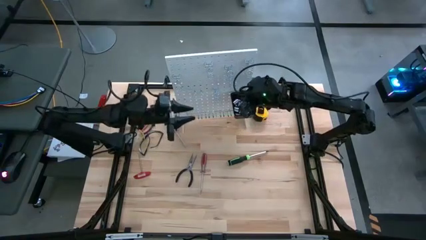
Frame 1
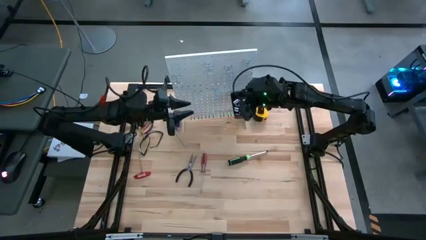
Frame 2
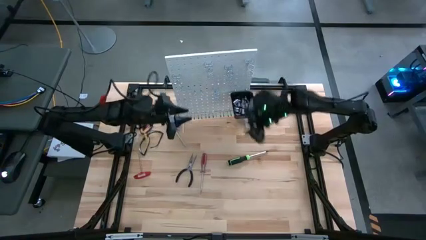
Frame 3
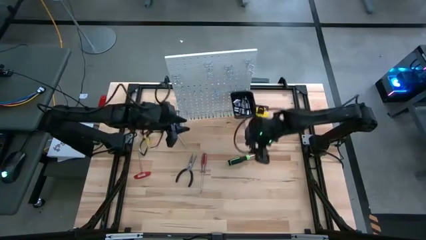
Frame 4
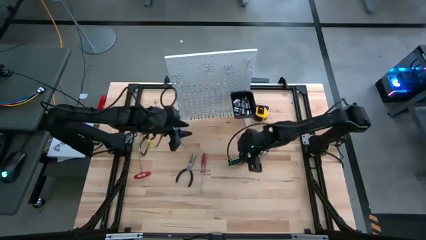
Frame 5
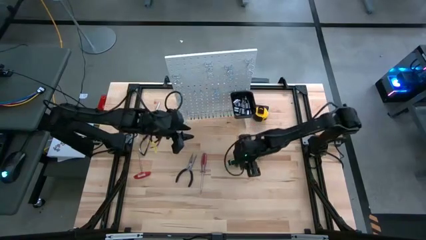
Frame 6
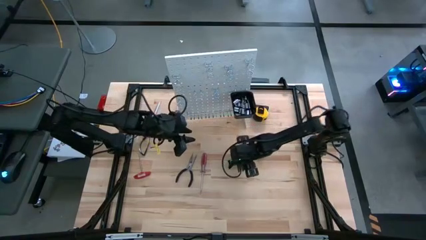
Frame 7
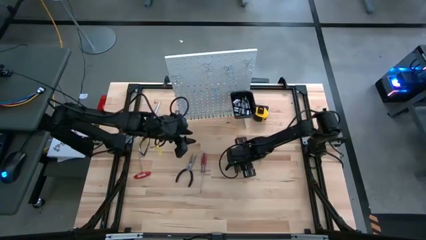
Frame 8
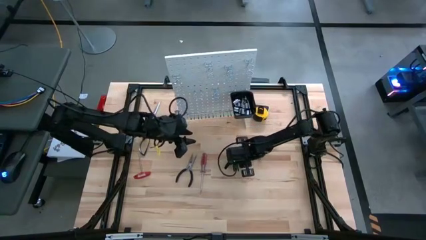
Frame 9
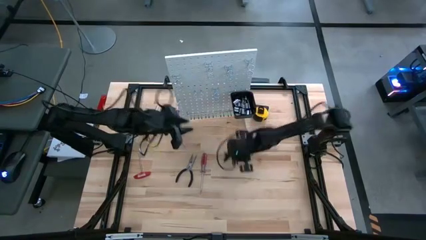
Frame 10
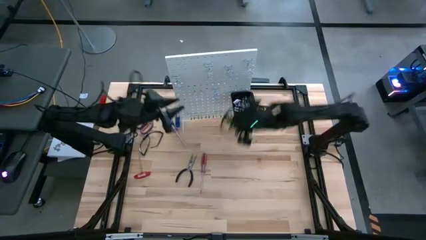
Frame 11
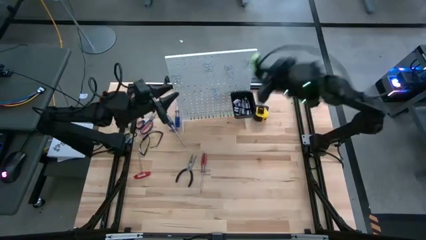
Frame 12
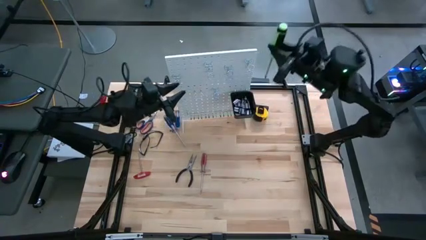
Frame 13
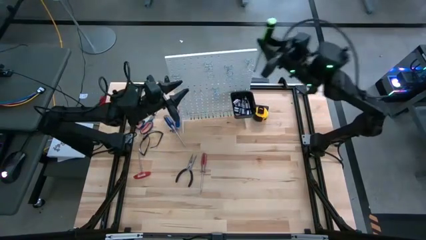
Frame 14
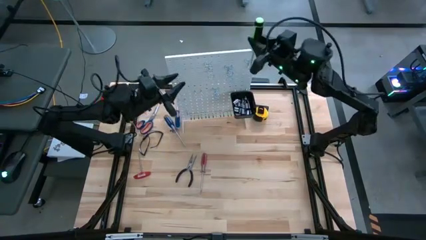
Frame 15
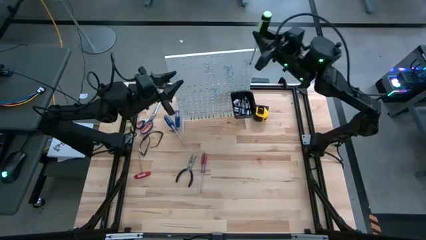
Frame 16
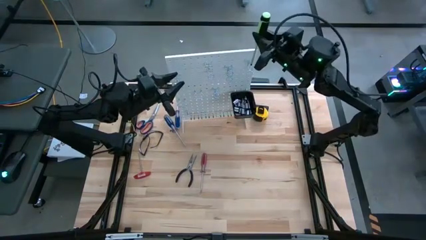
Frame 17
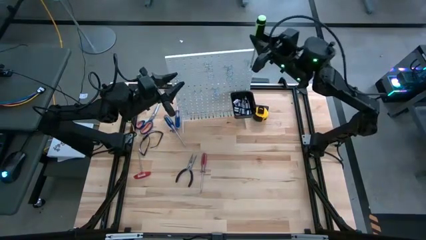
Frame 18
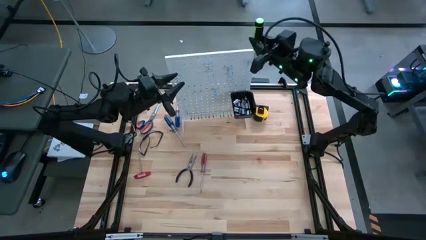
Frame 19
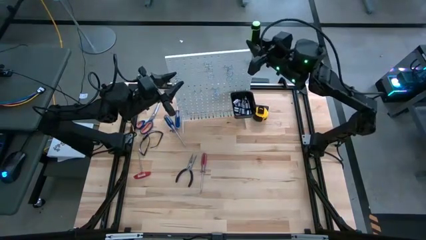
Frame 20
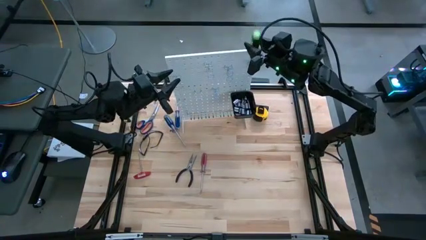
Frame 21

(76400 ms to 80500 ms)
Task: Hang tools onto peg board
Hang the black screwdriver on the peg board

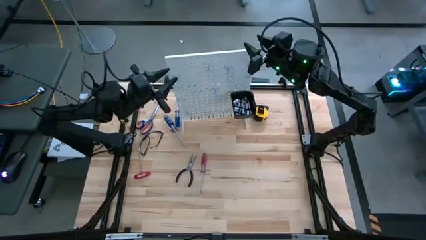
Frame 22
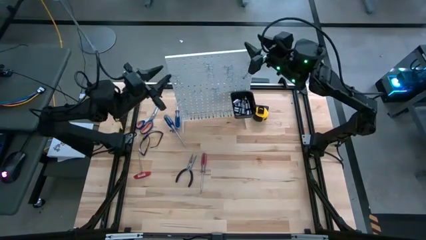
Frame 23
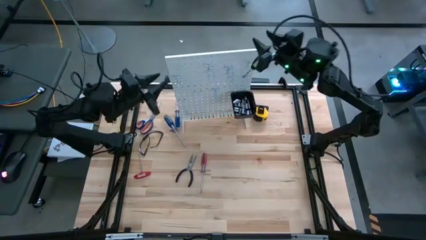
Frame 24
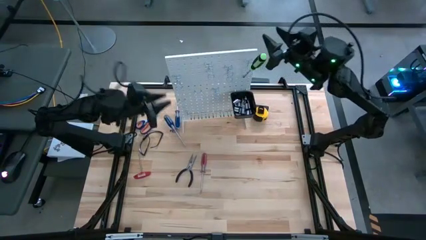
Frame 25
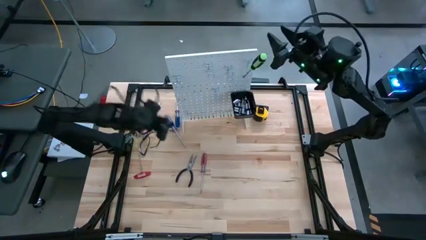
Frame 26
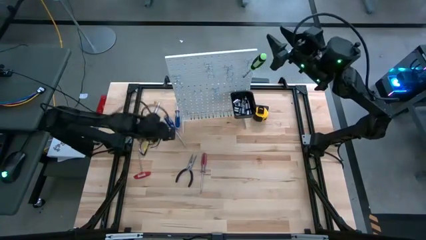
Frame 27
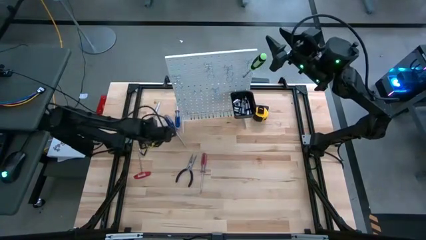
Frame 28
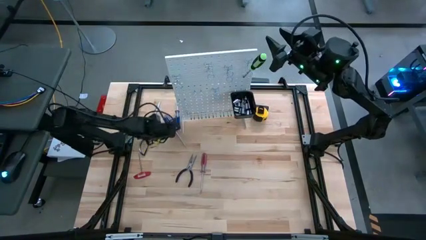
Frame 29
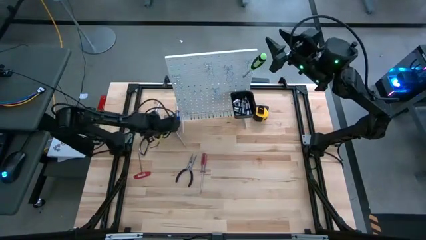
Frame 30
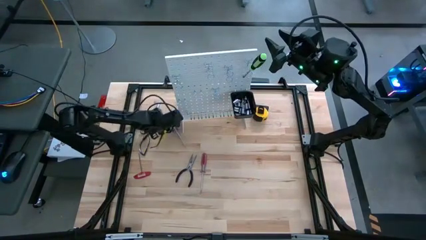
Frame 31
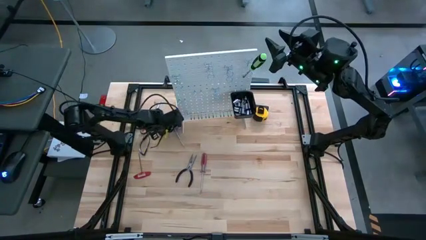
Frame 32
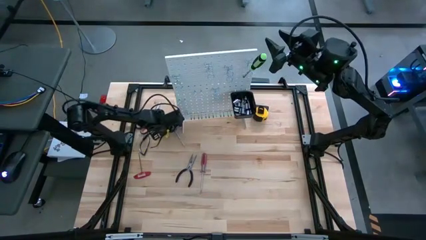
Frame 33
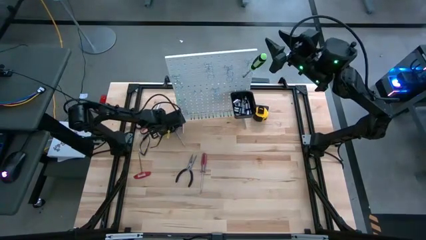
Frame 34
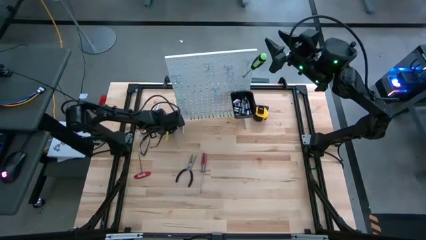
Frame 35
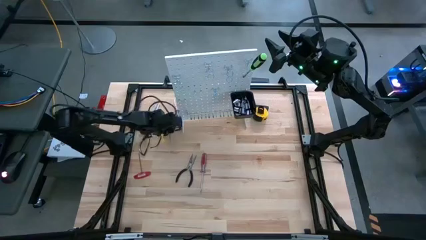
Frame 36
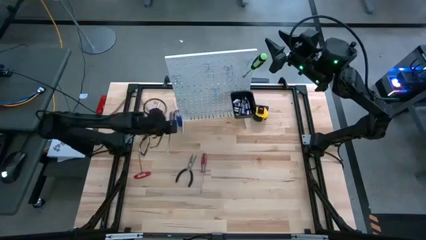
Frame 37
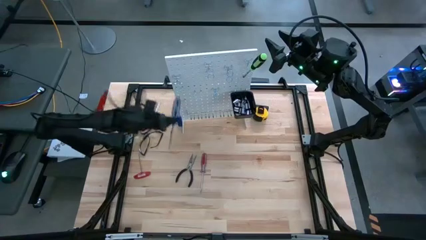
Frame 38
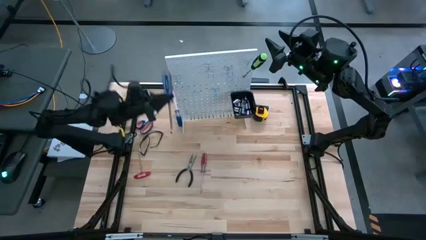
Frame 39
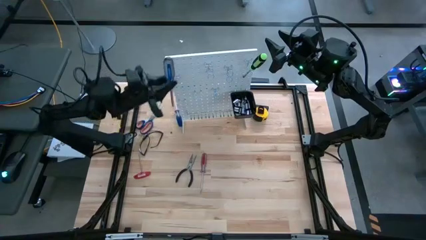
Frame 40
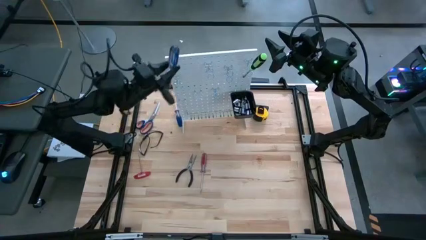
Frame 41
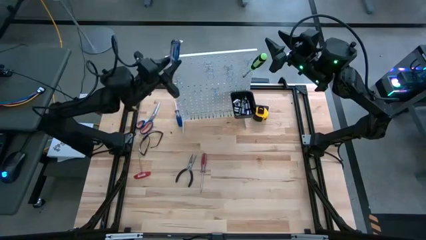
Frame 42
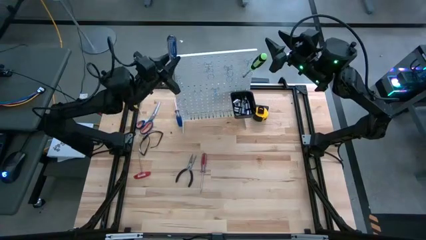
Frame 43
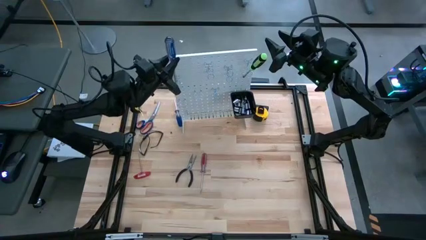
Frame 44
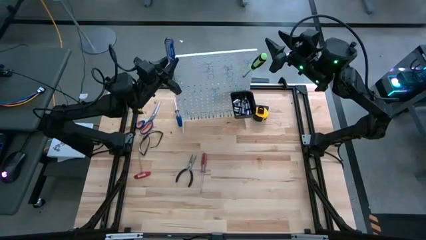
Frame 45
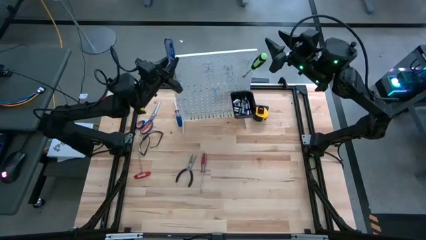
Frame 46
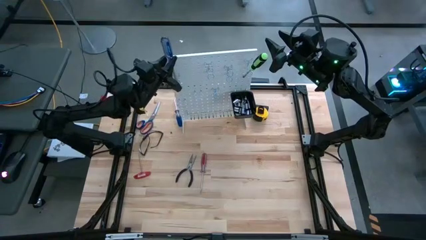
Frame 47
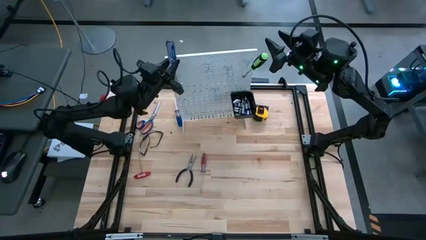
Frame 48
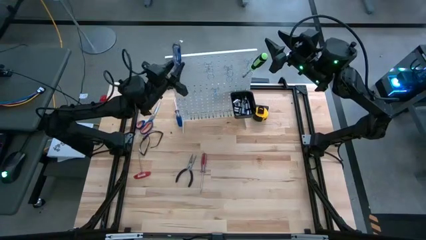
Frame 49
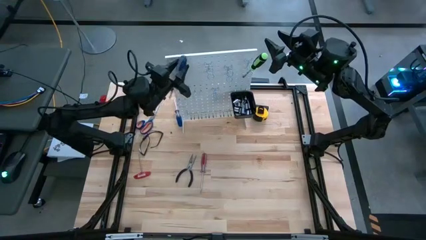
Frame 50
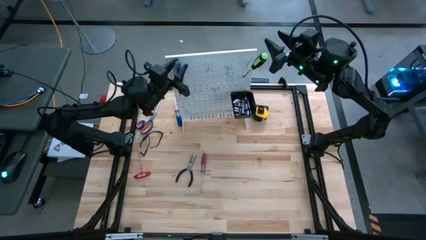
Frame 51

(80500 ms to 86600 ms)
Hang the blue screwdriver on the peg board

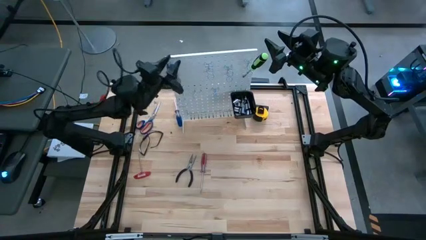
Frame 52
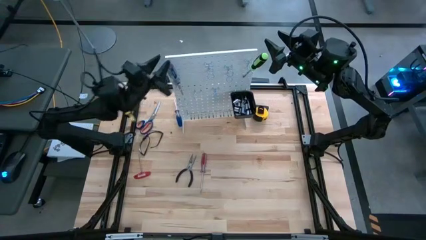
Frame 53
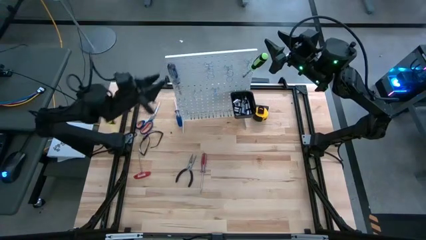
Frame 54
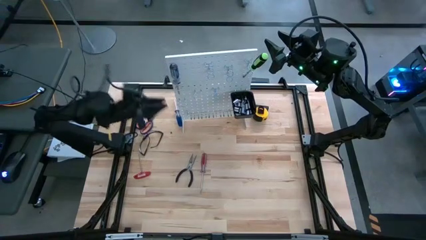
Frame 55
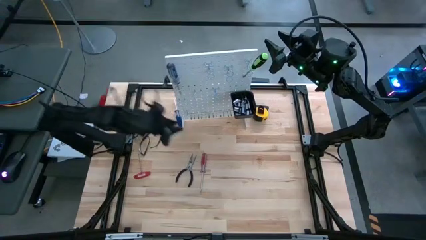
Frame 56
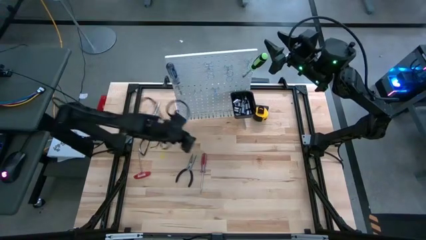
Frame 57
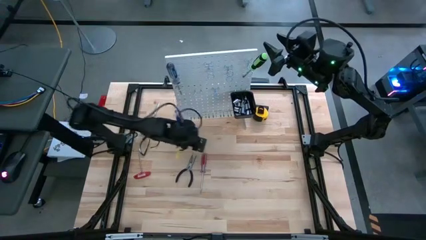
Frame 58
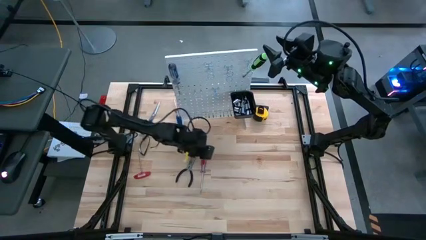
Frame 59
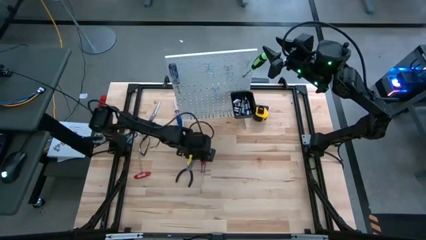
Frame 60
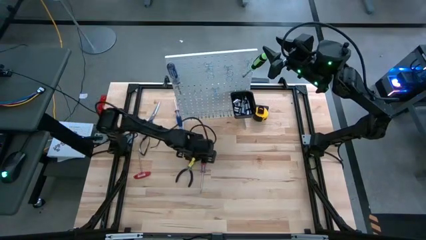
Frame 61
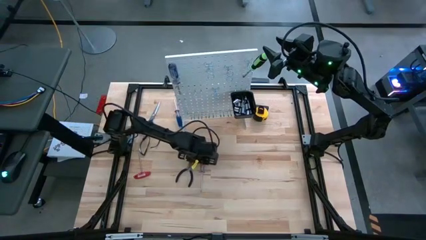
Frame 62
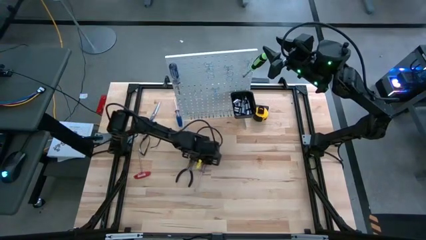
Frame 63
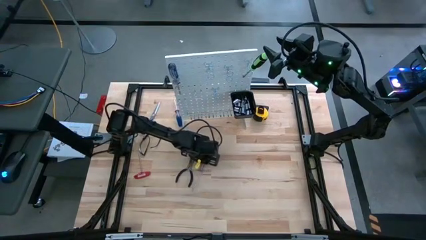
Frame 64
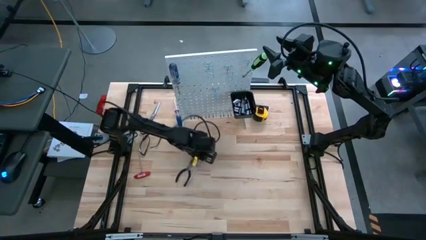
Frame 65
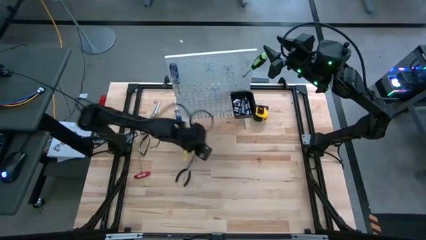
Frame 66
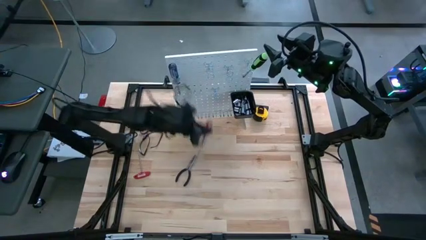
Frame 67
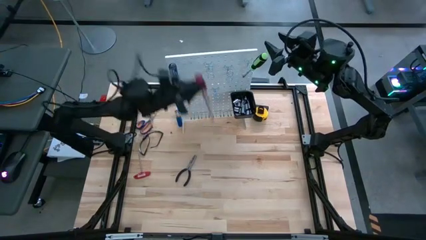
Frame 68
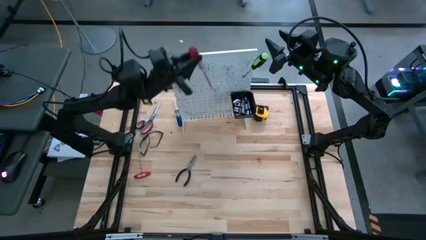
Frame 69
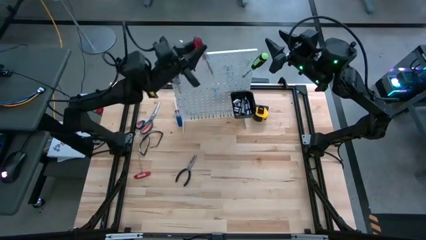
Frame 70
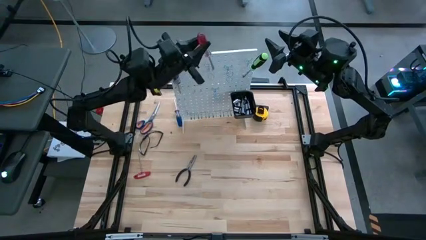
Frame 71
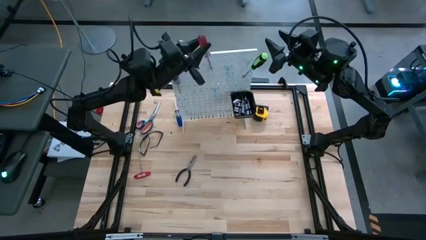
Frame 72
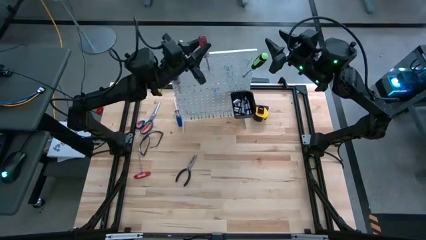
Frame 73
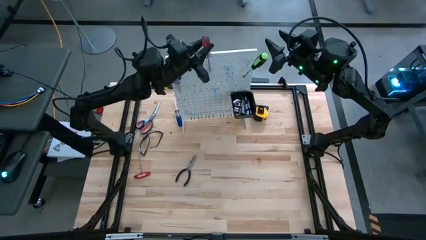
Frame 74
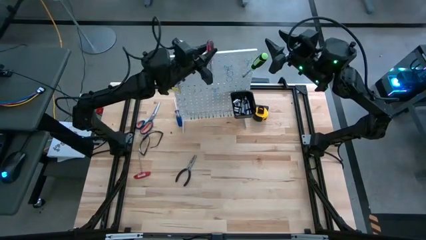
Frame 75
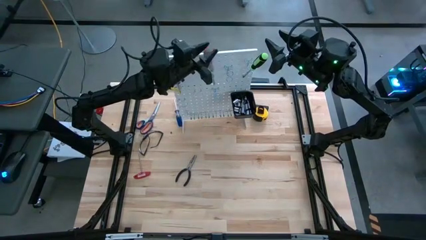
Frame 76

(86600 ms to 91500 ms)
Hang the red screwdriver on the peg board
